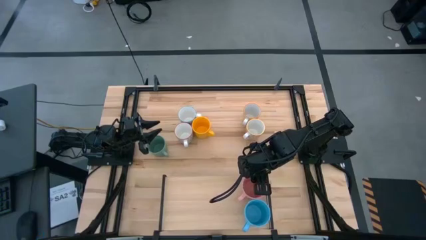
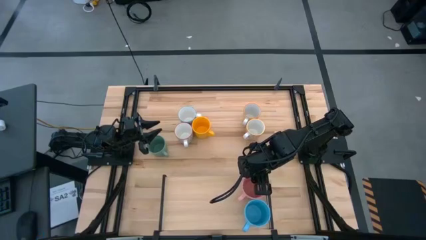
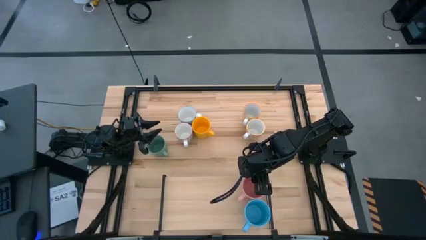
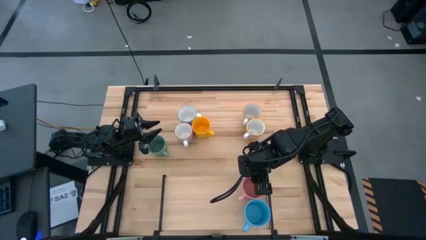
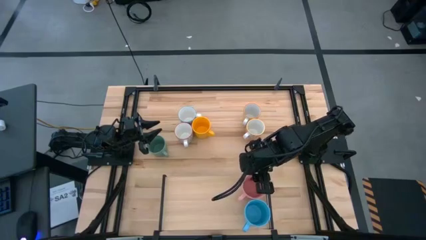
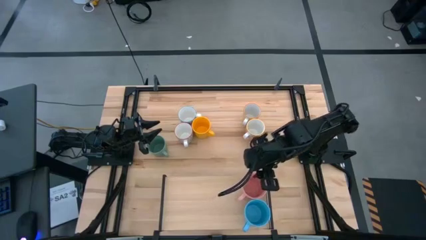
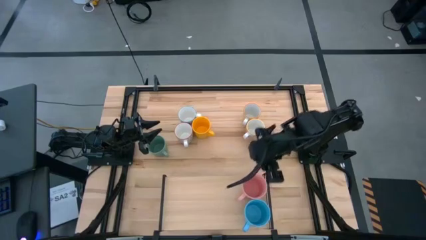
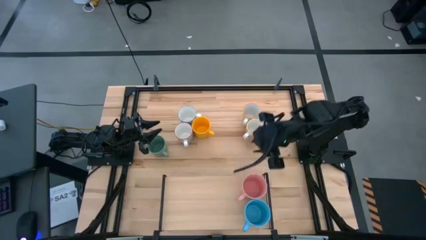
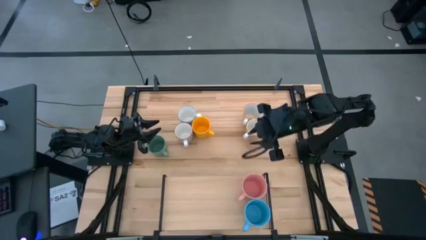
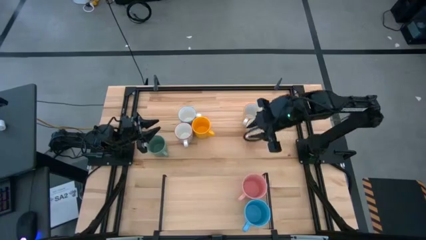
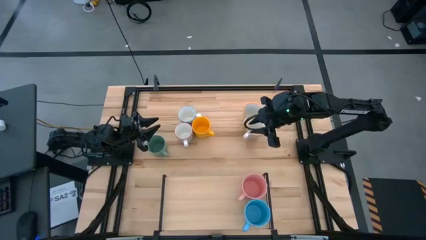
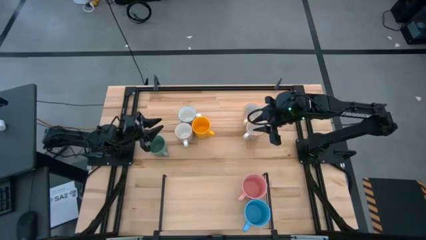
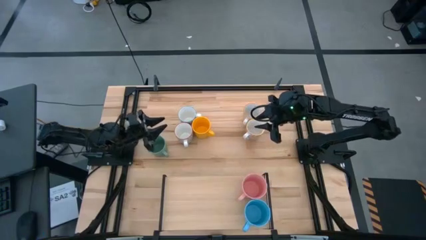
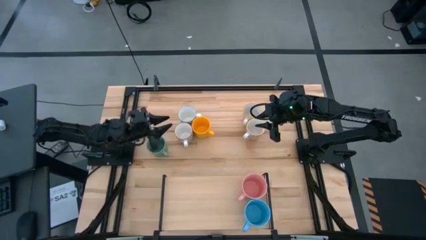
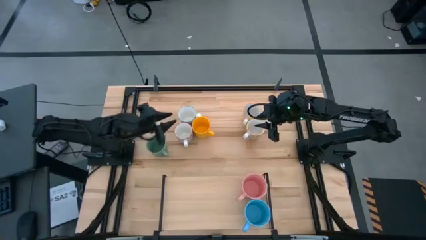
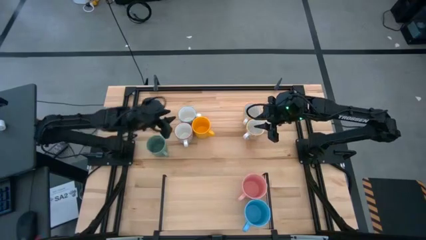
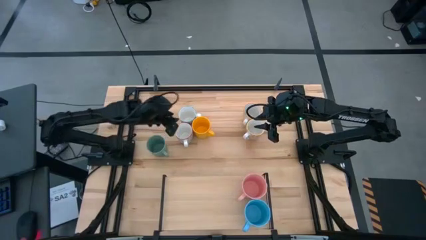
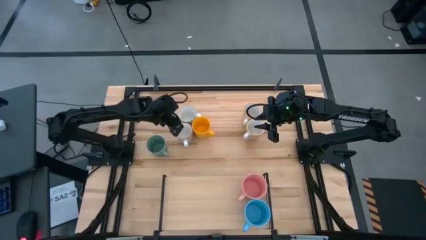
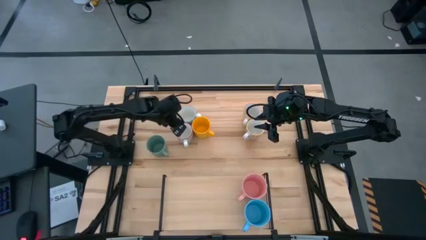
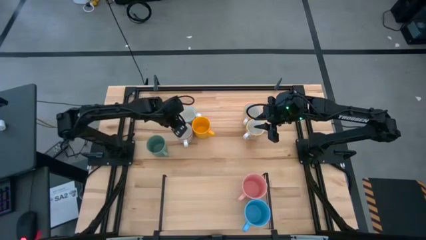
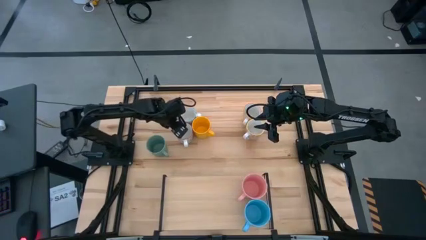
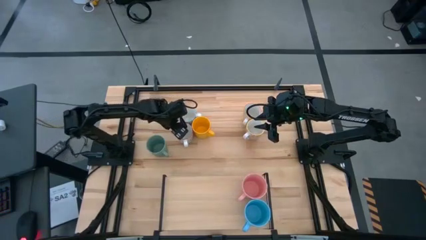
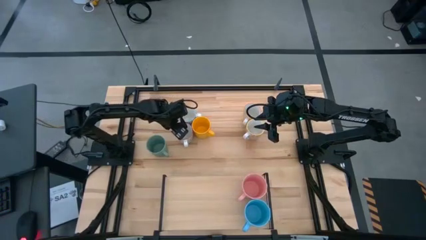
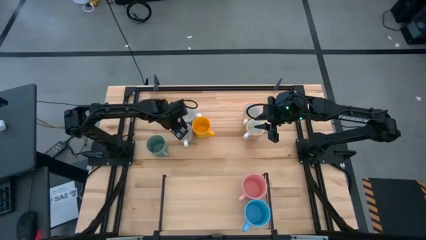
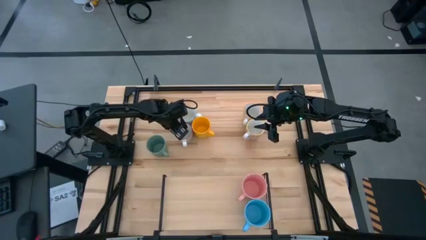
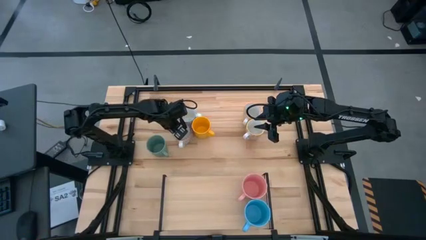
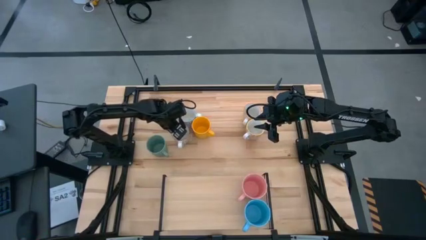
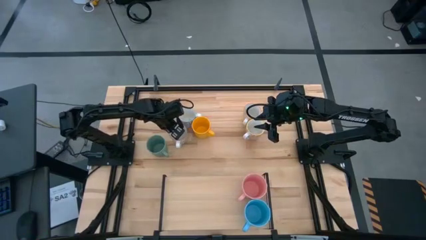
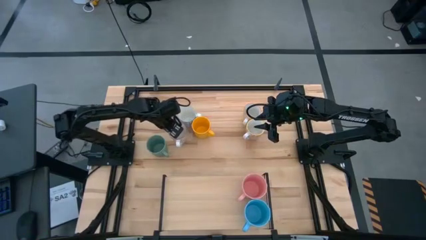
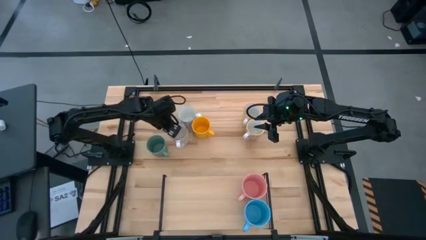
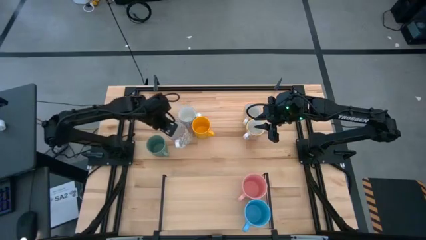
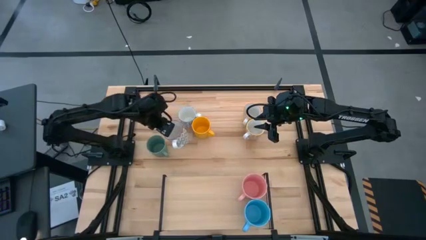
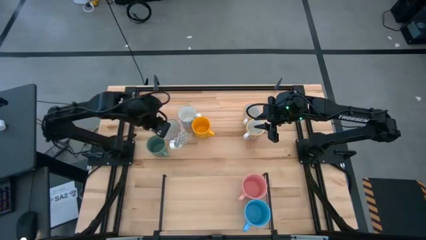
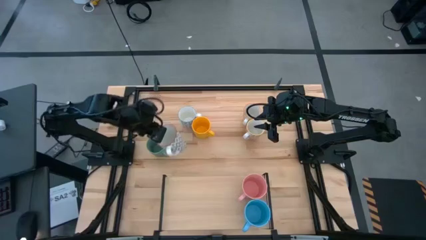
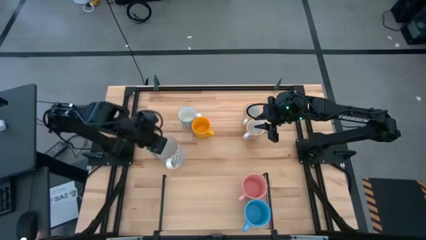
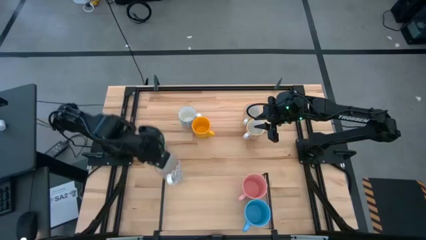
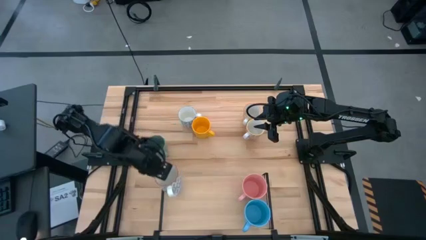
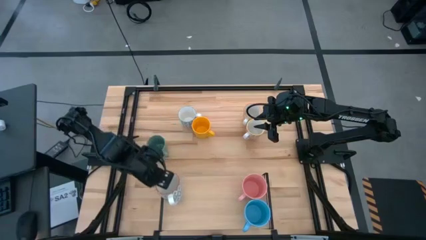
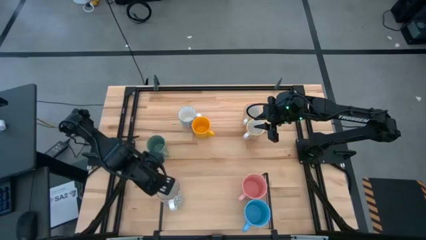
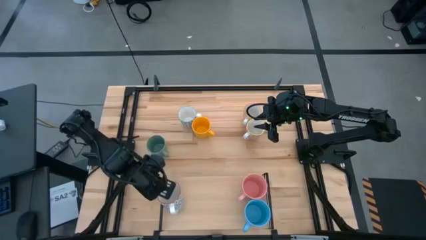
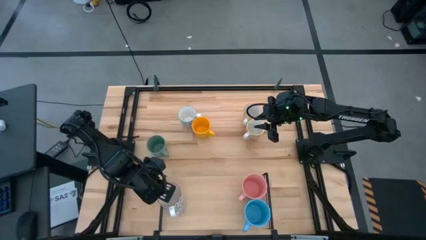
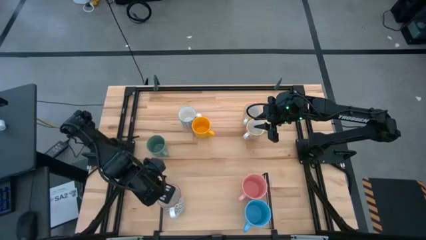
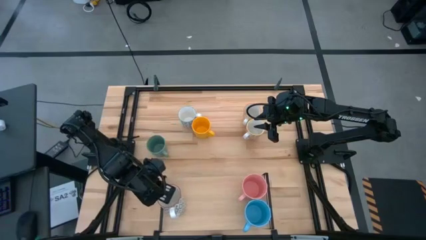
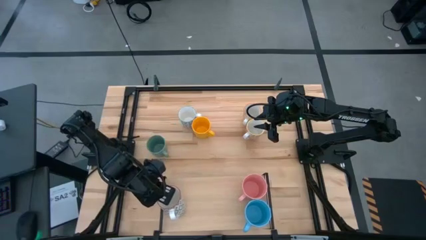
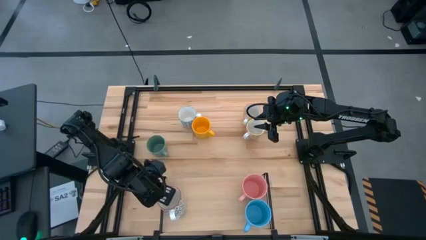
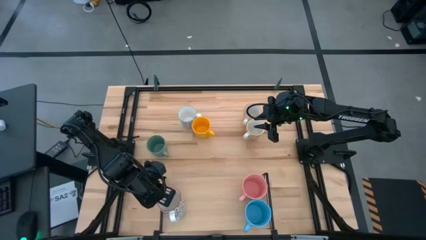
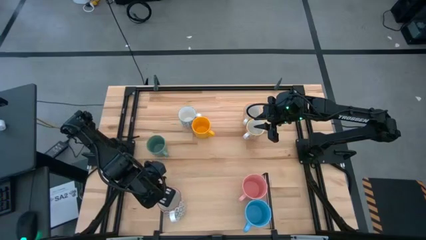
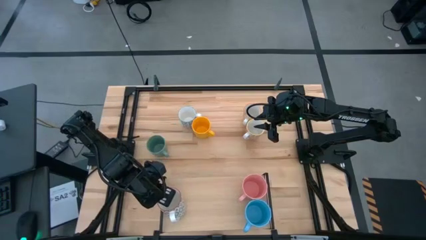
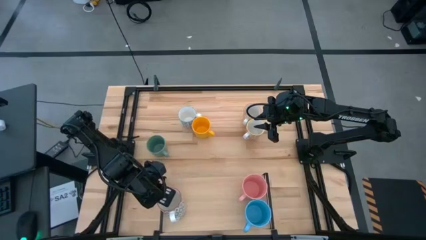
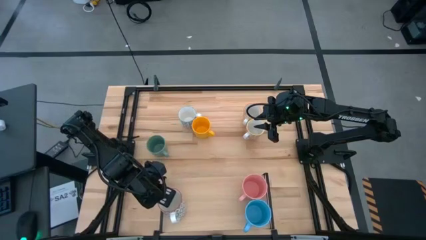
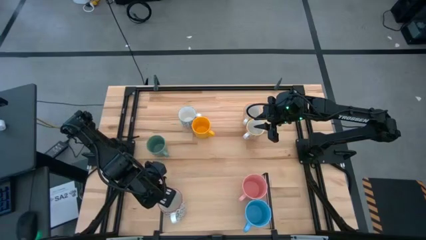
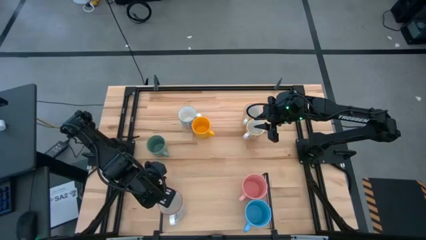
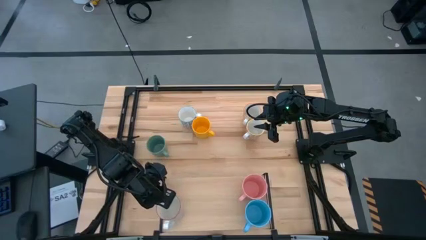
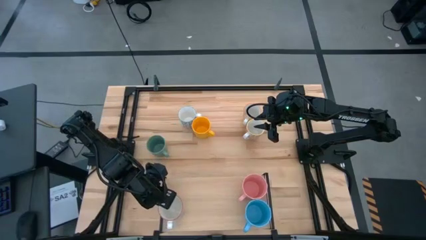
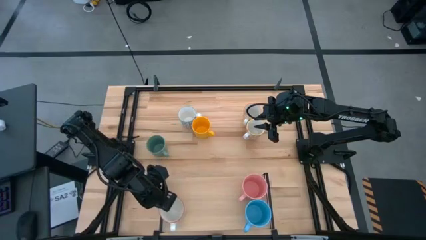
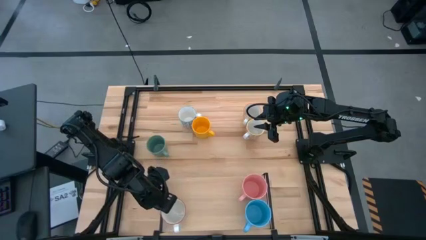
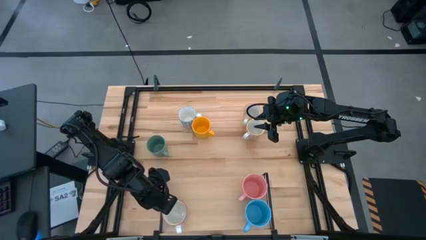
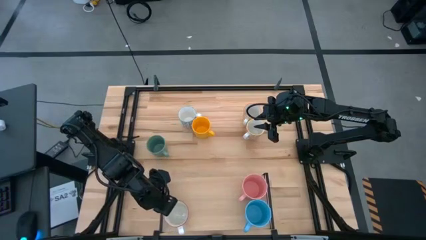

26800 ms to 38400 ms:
Task: Place coffee mugs
Put the grey mug on the shelf

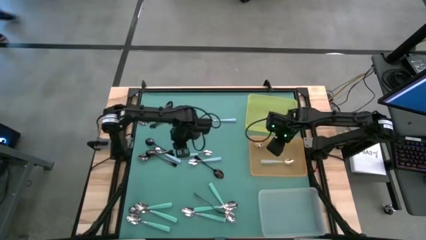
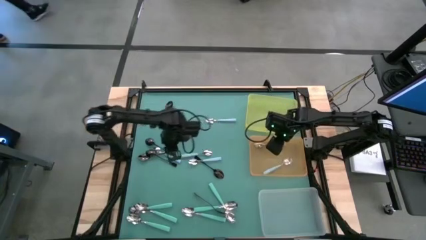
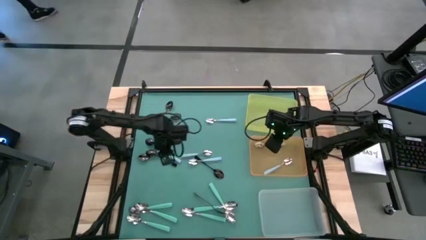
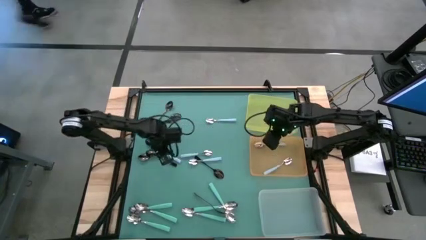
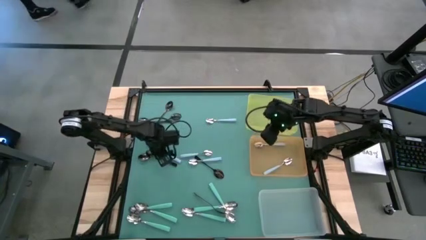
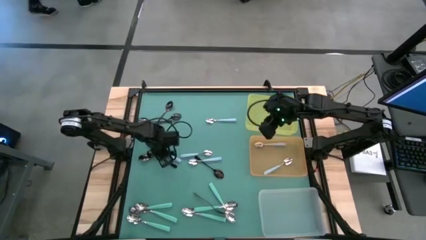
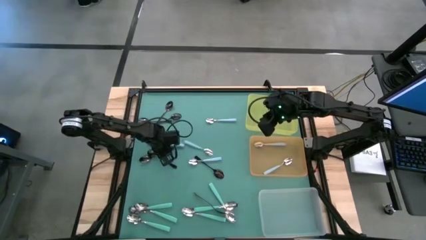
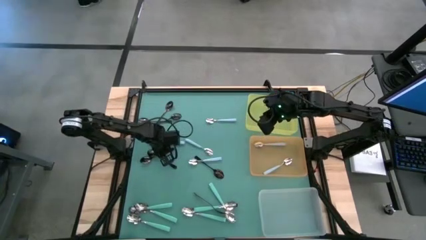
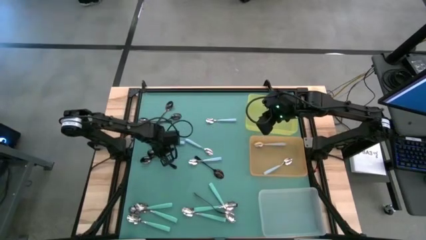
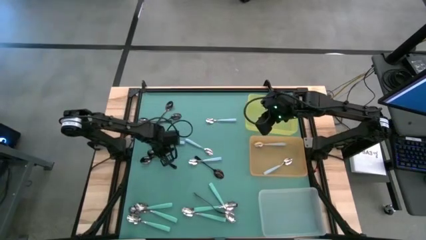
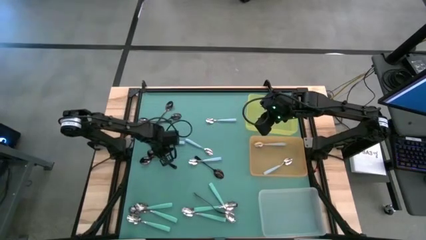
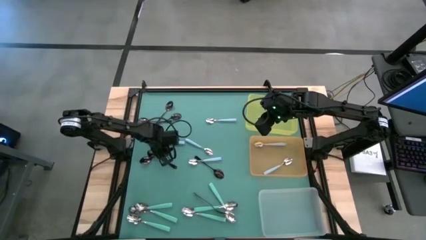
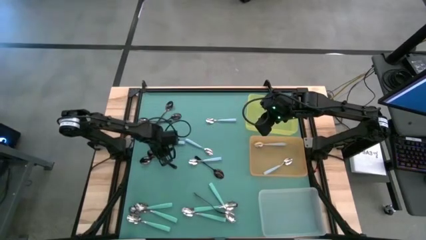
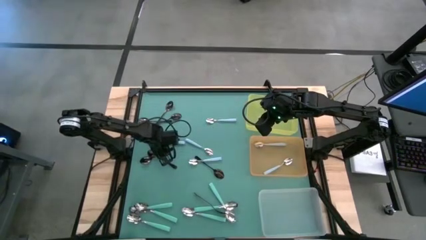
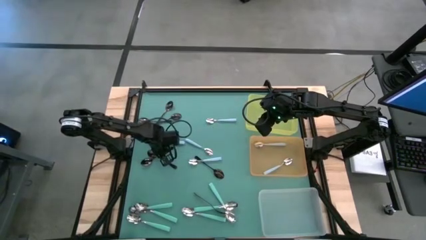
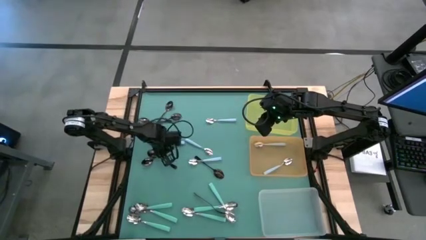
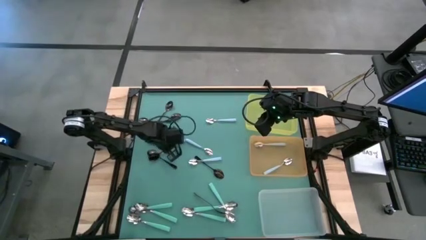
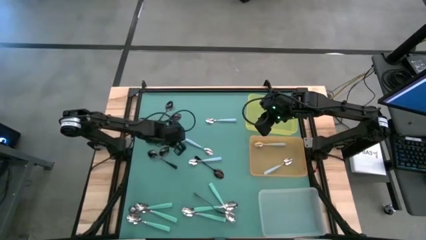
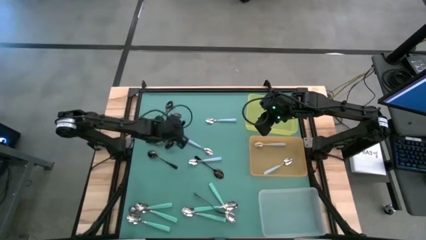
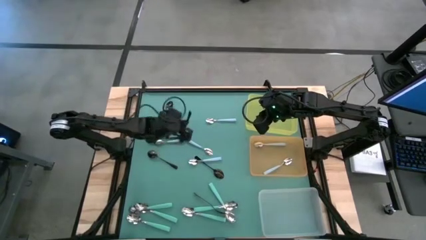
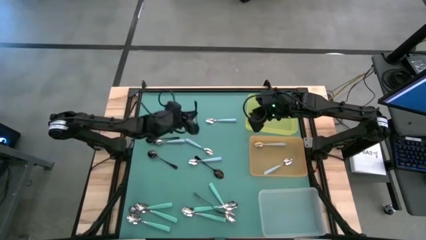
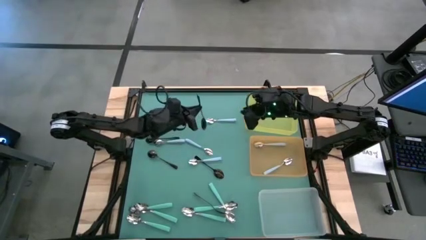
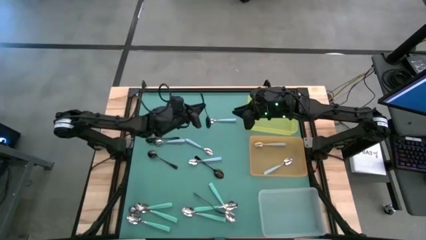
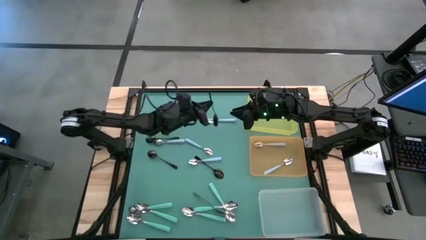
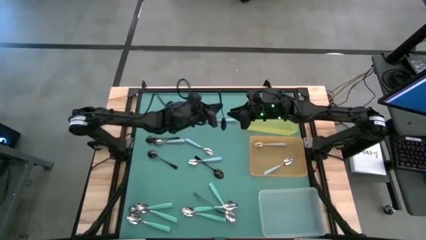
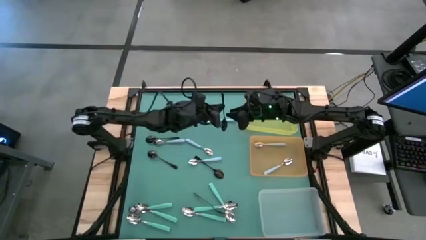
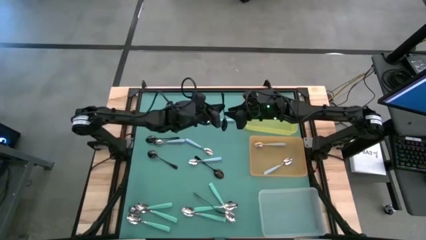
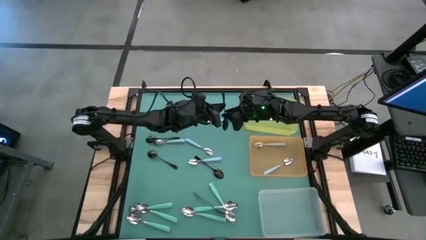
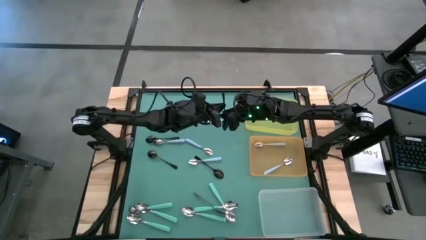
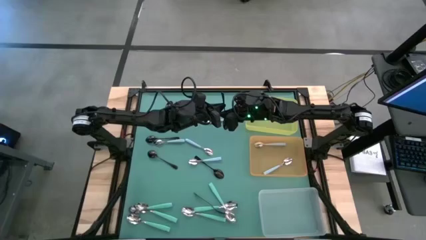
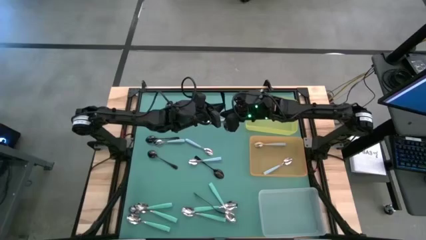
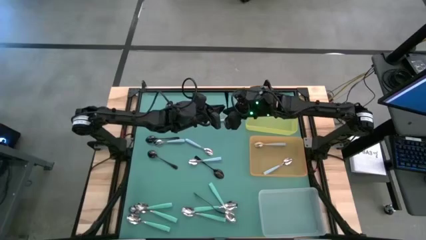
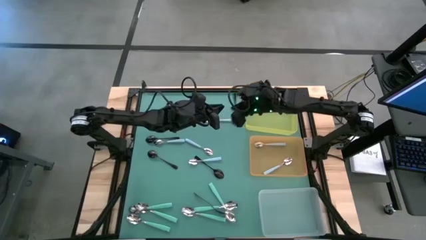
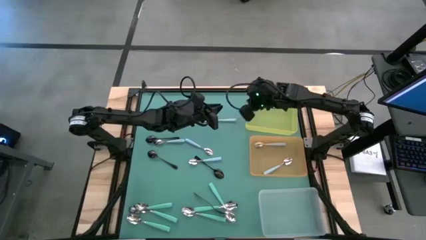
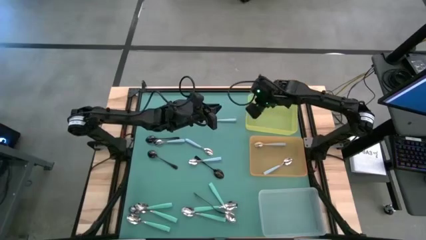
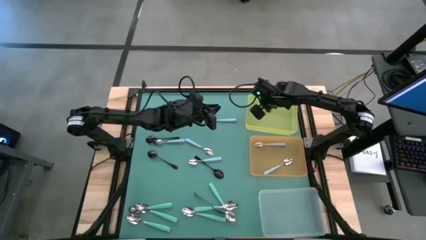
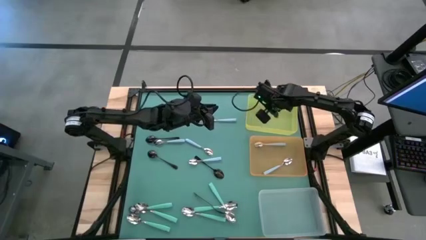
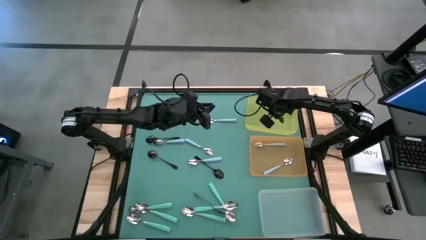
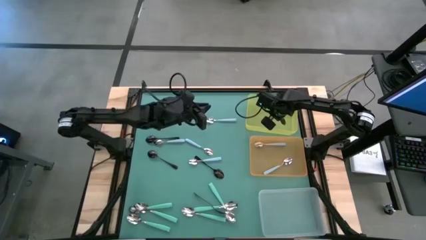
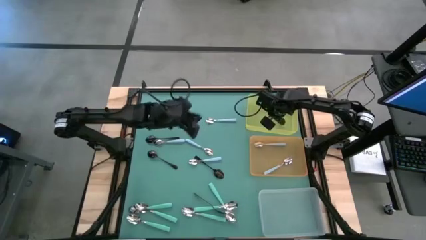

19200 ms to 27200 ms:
Task: Sort silverware by color (type)
Put the black spoon into the yellow bin
